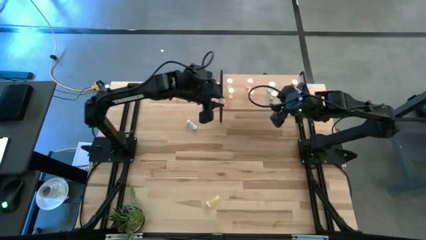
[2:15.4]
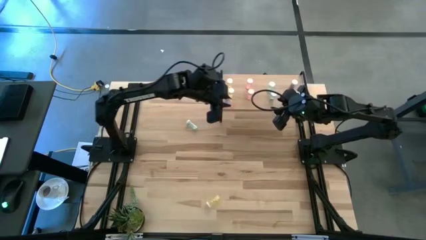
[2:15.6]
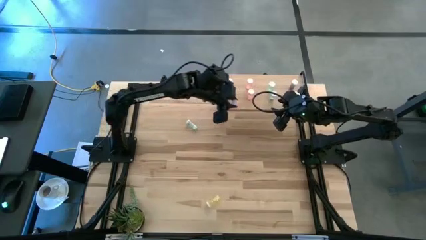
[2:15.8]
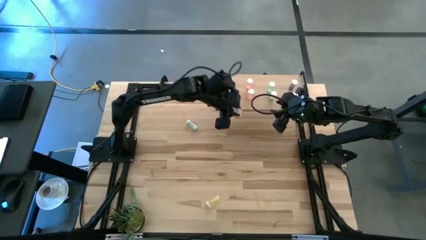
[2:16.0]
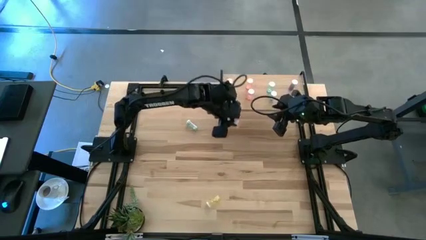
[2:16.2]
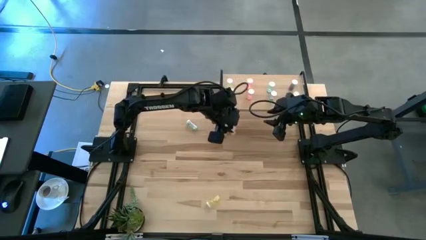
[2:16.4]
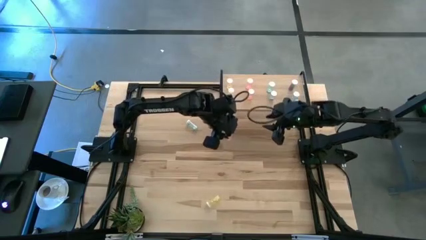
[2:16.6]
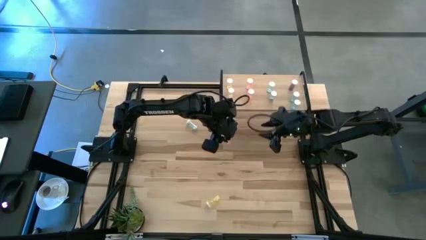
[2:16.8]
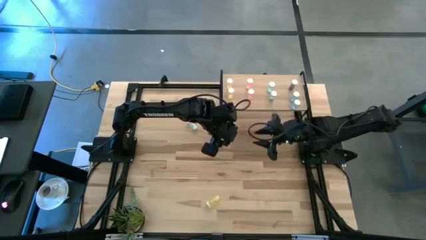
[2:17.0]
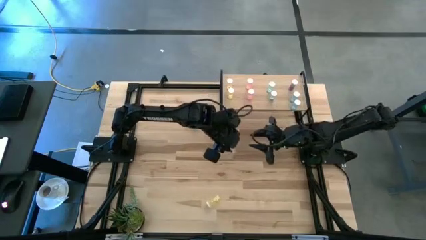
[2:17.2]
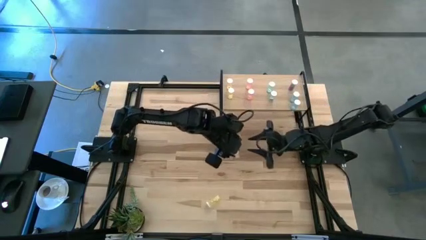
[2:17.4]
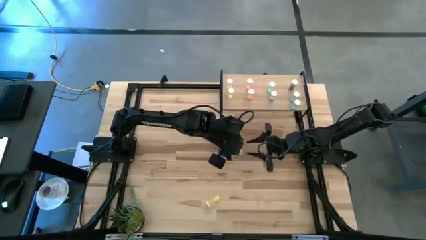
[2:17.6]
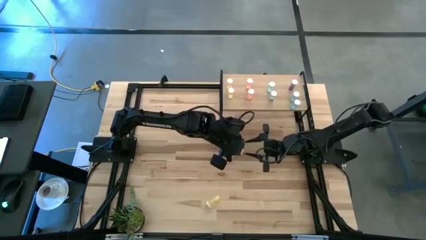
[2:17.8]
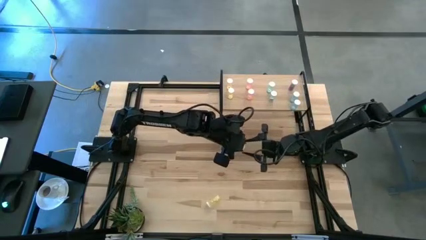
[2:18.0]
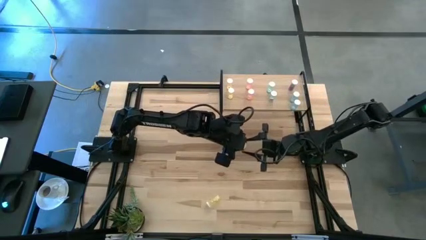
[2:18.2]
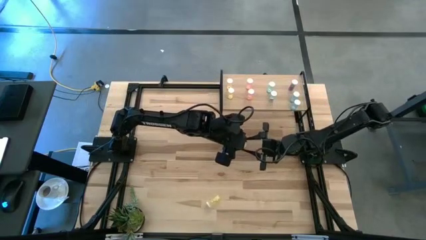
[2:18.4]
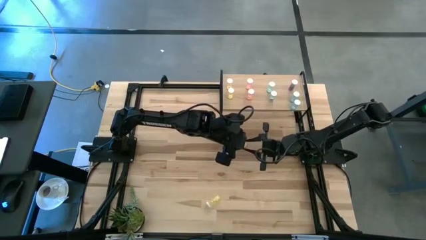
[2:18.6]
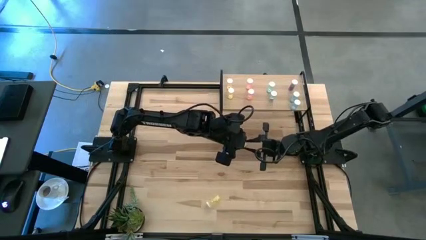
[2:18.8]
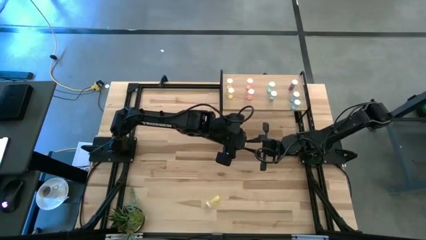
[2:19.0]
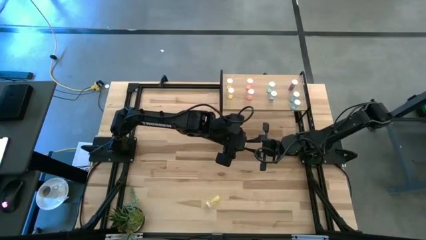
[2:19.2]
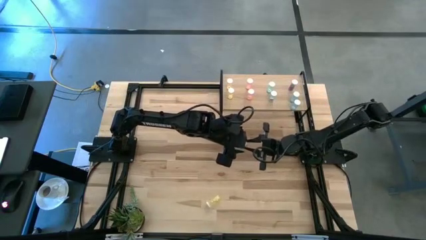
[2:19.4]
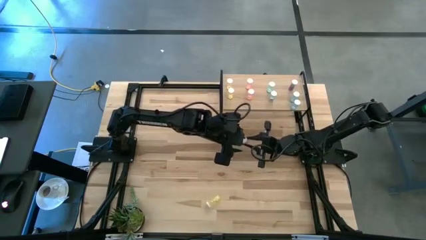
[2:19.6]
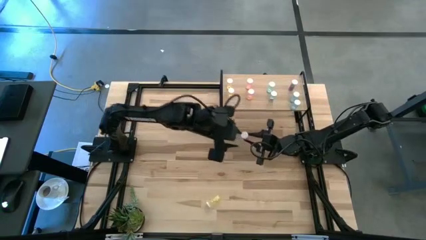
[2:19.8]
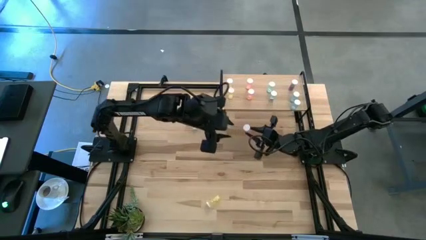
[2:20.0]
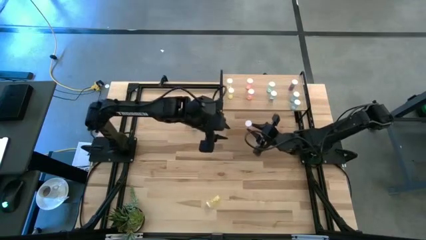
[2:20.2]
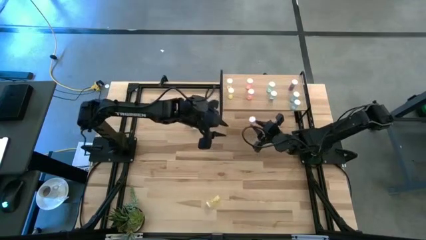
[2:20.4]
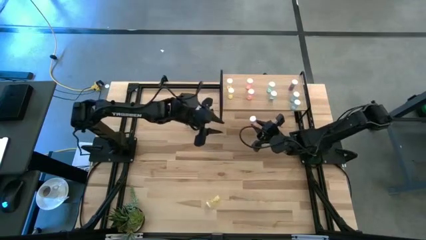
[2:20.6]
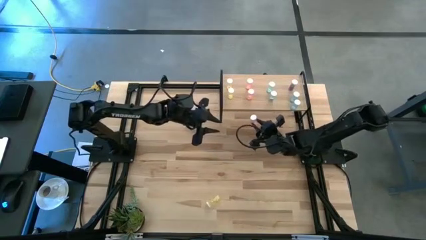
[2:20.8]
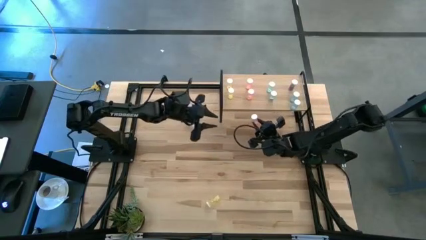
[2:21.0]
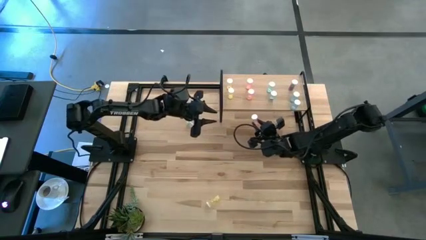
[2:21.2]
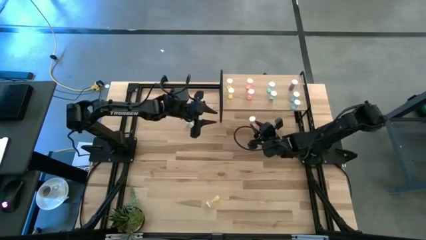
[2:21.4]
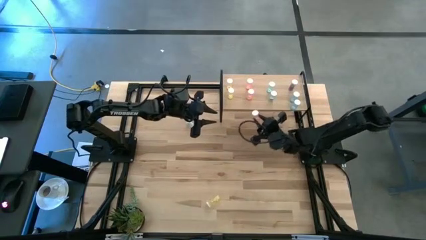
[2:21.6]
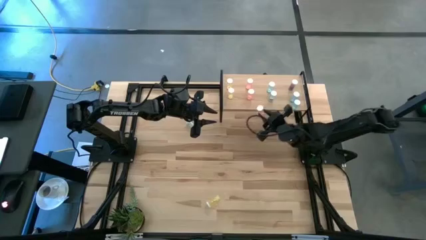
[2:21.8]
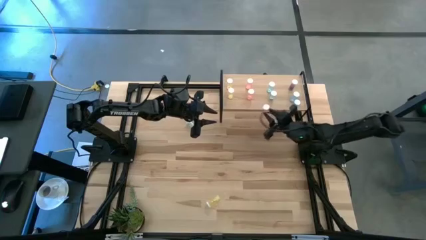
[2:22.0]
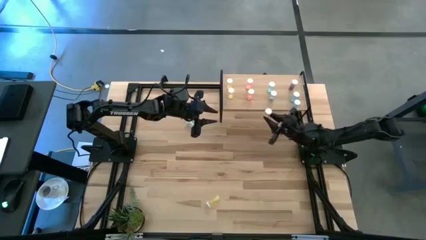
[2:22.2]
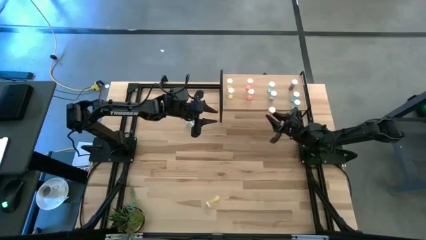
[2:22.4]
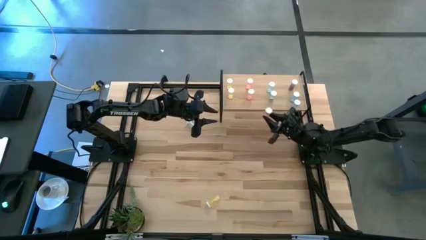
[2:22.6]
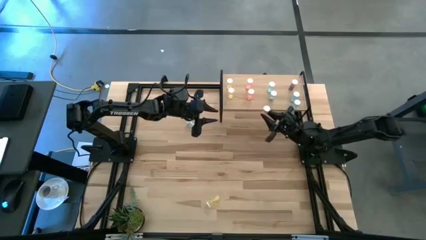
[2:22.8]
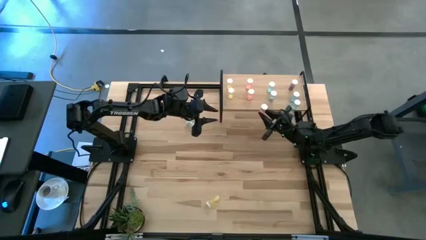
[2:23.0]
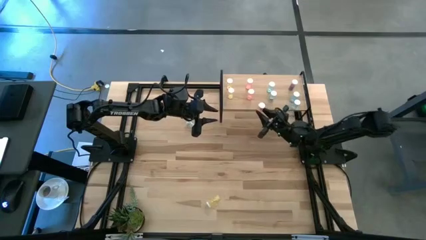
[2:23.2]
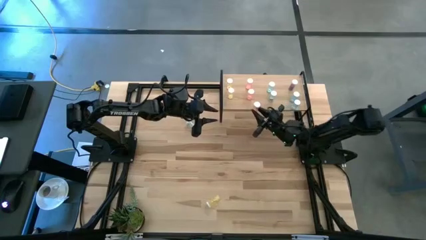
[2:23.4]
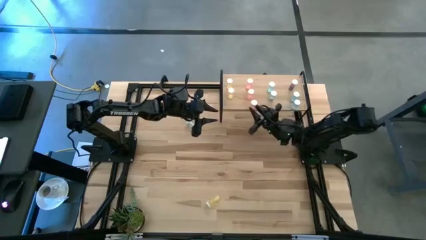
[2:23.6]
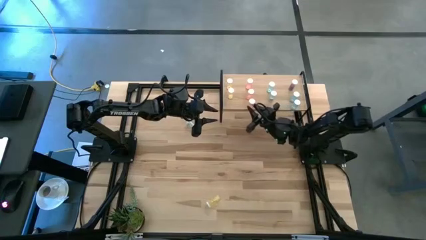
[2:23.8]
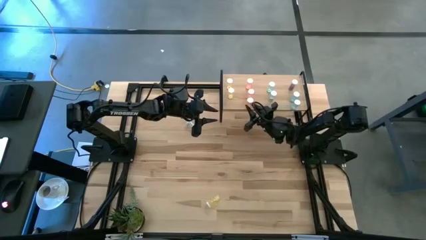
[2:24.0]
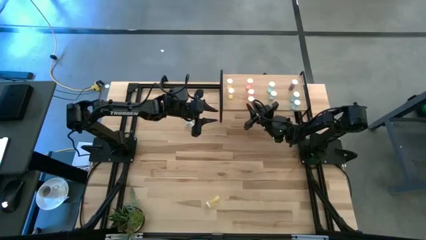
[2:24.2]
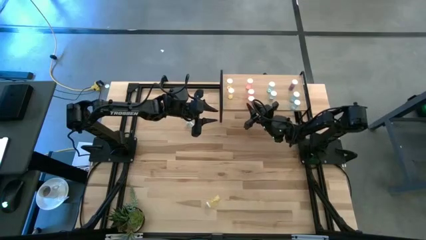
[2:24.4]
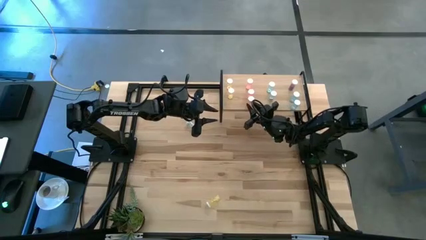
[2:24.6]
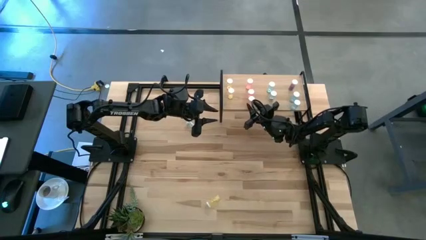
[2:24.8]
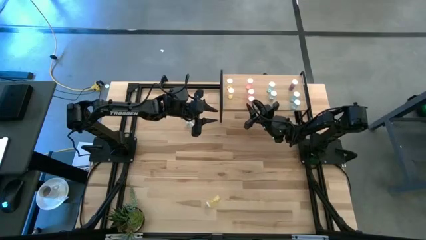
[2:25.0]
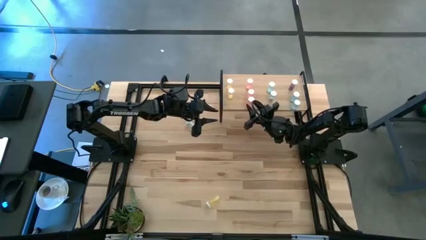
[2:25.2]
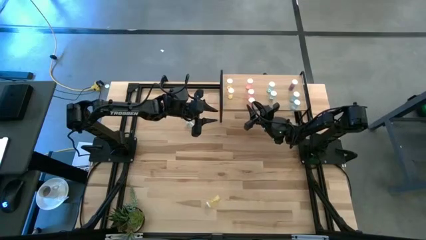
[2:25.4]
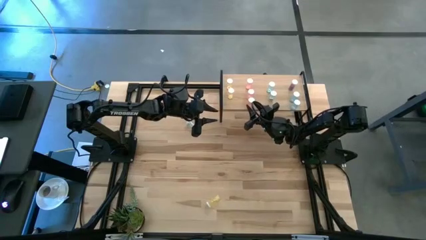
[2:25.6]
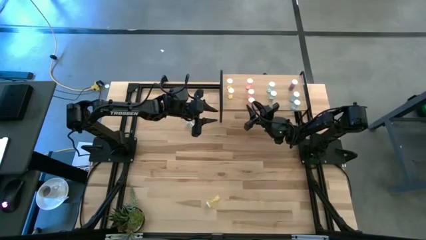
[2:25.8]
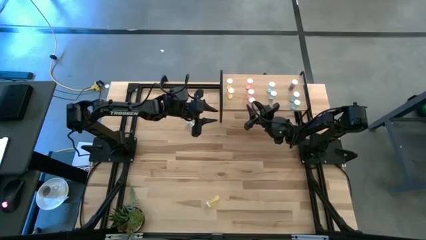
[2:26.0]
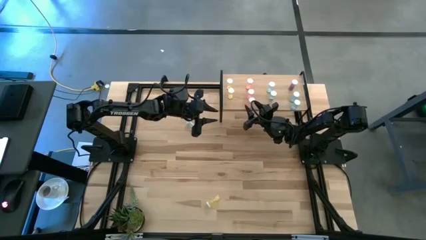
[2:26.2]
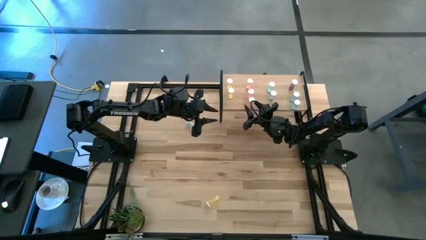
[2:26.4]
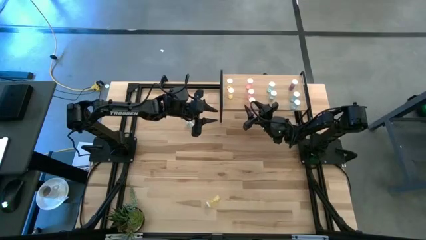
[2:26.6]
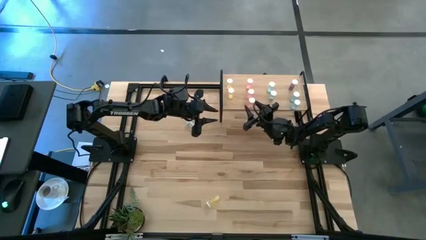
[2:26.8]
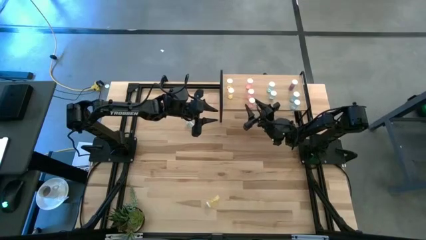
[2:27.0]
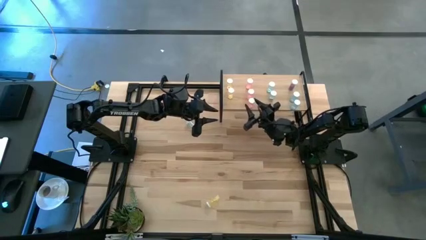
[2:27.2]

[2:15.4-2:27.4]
Task: Pick and place medicine bottles onto shelf by color
Put the pink pill bottle on the shelf aligned with the other pink pill bottle

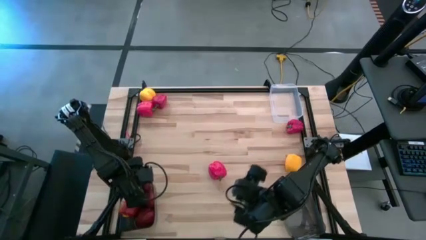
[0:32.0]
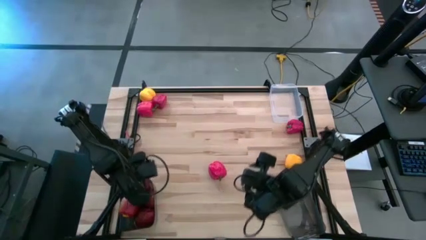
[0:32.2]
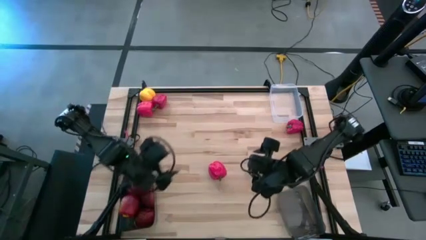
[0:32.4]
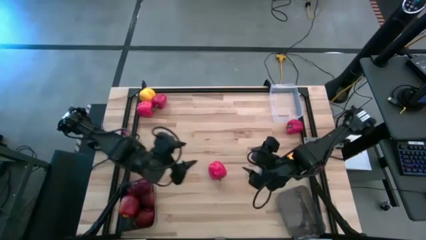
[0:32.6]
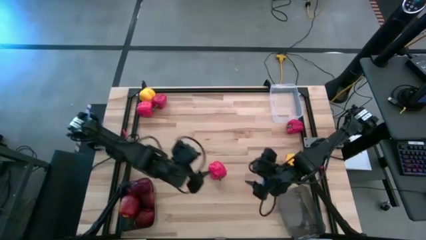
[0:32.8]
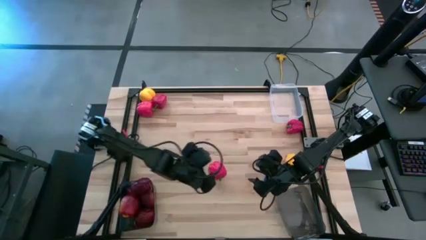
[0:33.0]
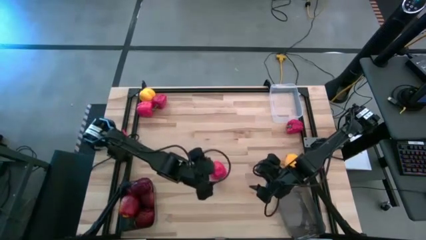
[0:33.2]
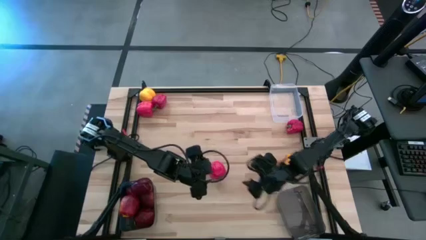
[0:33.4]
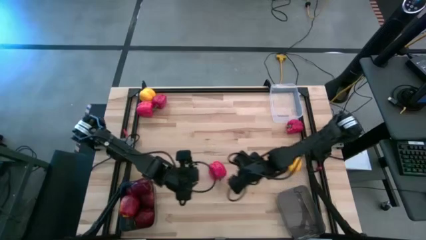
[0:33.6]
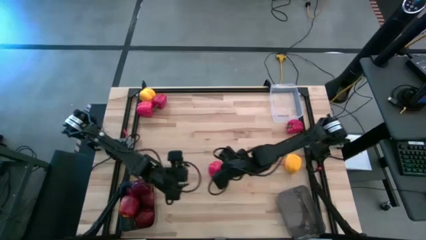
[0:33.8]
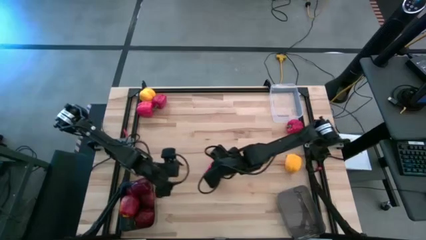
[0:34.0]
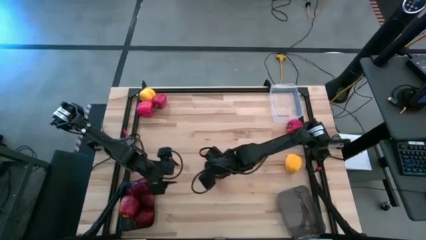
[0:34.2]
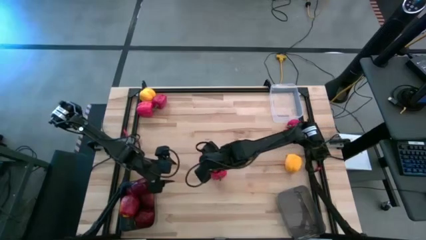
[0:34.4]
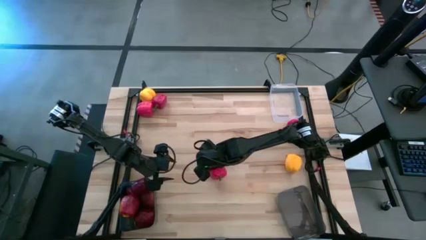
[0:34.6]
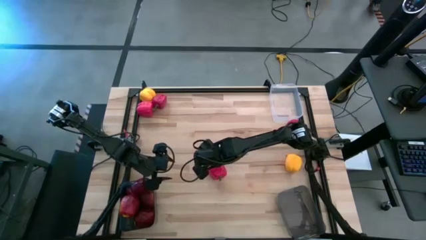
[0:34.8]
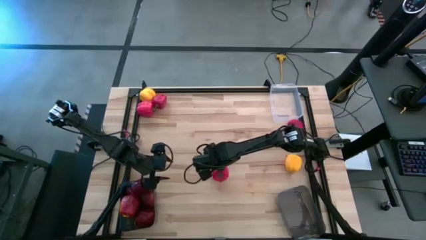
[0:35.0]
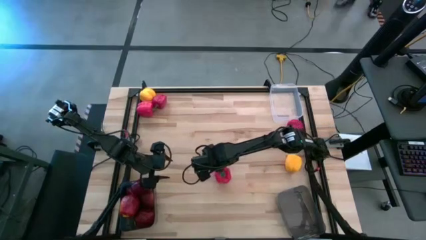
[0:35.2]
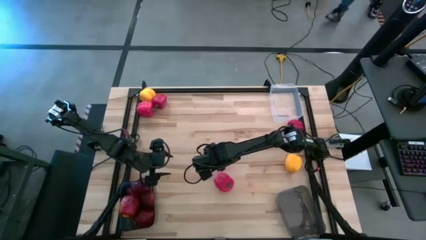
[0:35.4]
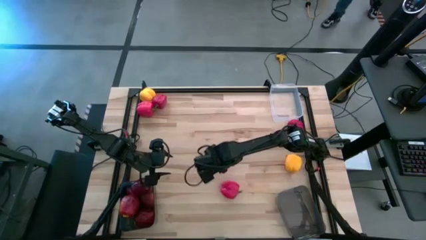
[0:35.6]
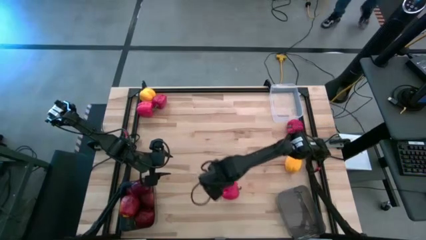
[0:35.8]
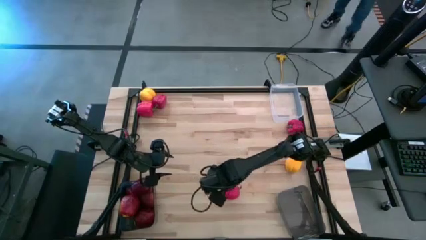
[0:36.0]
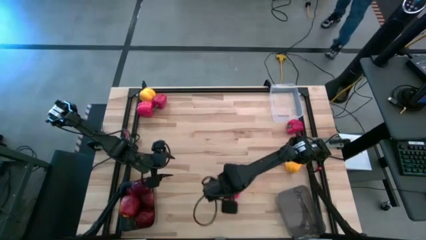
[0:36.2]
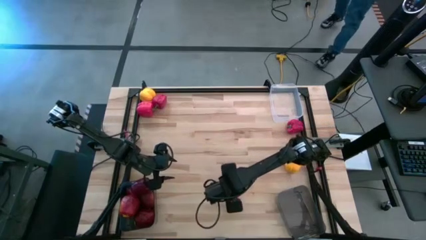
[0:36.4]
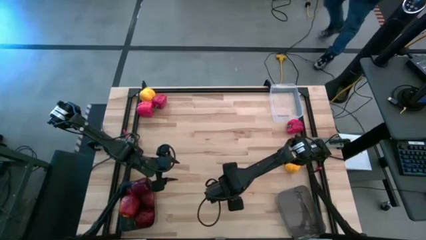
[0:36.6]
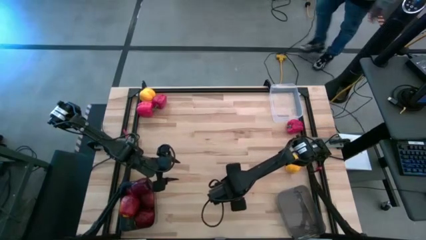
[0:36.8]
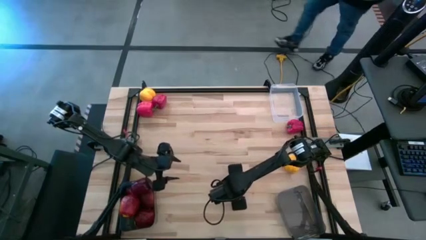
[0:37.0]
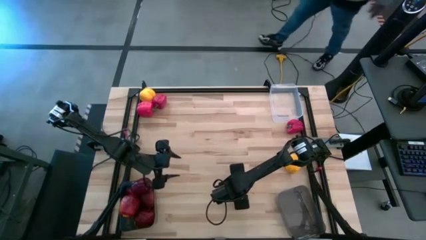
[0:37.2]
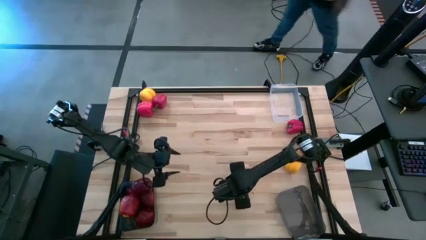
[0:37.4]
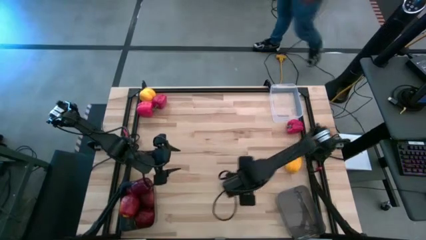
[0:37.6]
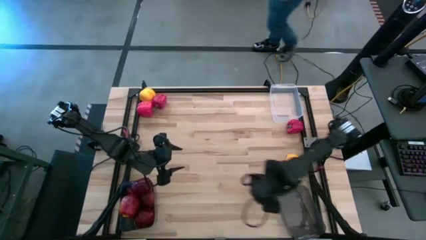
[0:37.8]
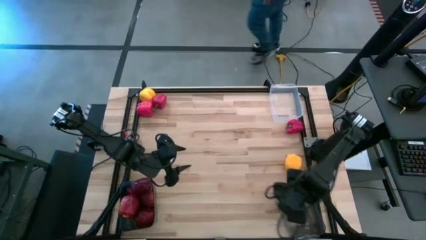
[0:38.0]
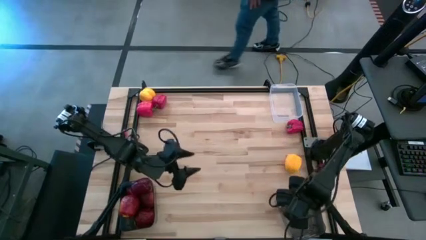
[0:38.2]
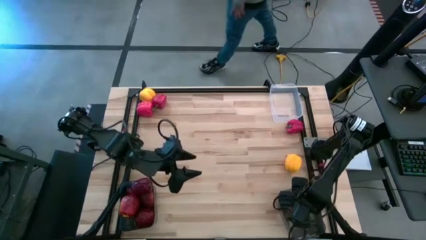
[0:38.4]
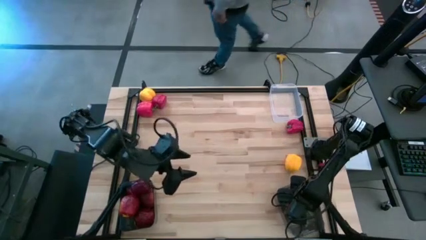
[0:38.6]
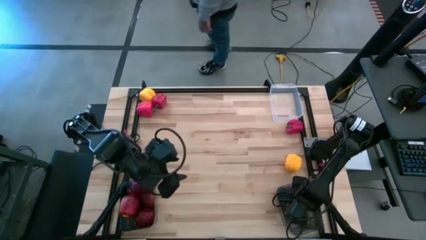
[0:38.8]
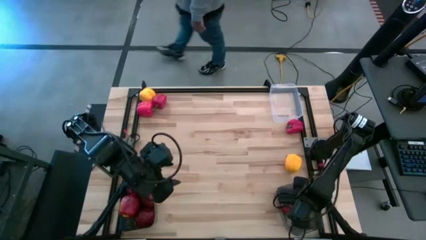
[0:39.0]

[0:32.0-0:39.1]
Task: Sort produce into baskets
Put the red bell pepper into the right black bin
